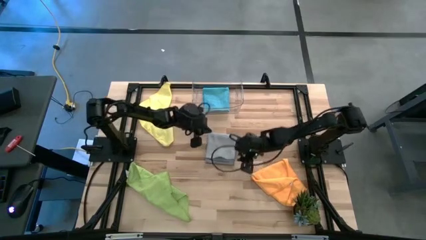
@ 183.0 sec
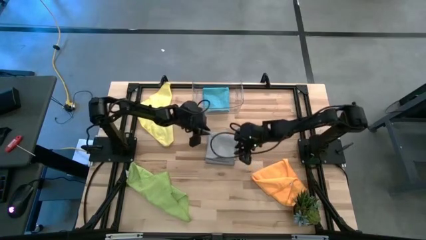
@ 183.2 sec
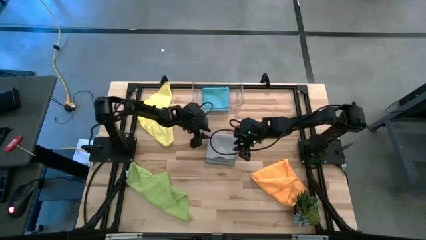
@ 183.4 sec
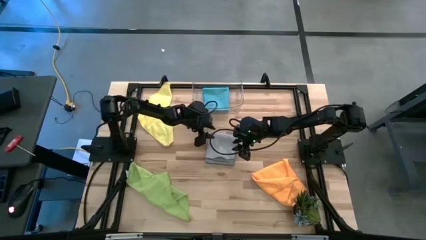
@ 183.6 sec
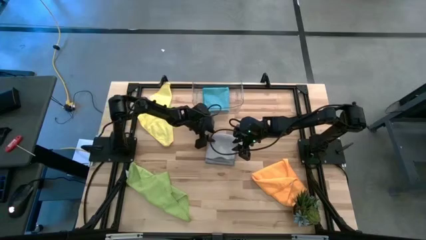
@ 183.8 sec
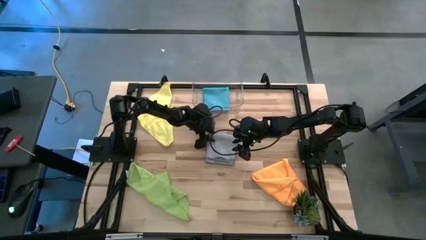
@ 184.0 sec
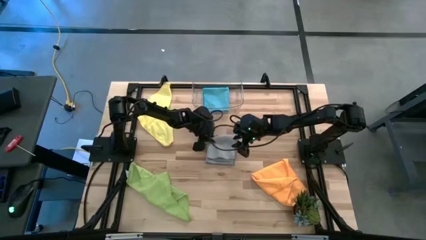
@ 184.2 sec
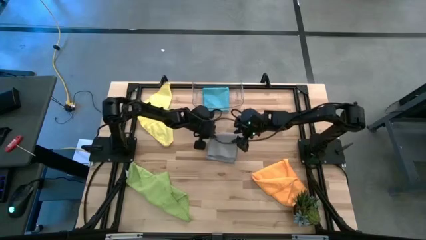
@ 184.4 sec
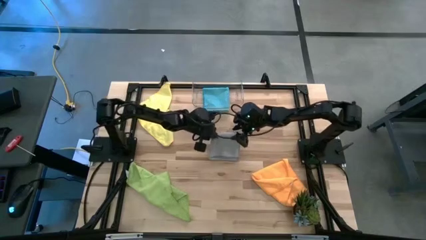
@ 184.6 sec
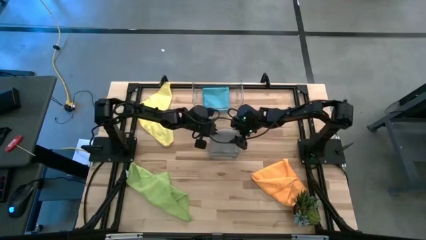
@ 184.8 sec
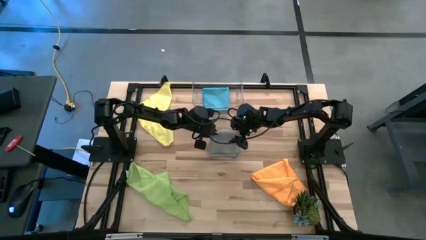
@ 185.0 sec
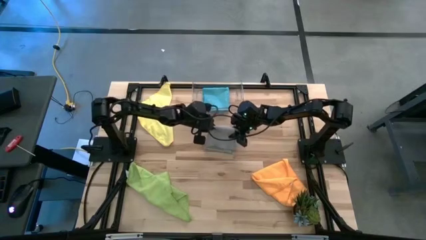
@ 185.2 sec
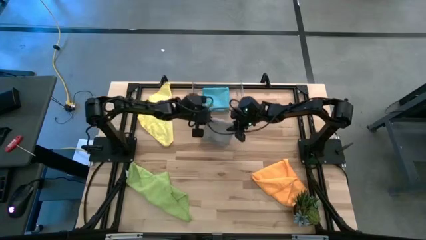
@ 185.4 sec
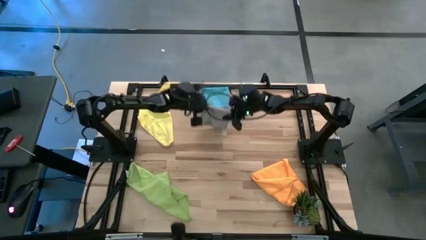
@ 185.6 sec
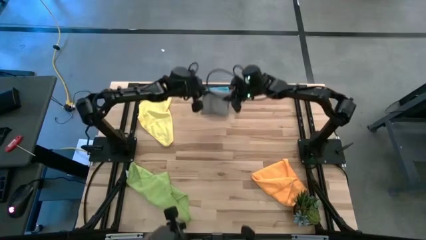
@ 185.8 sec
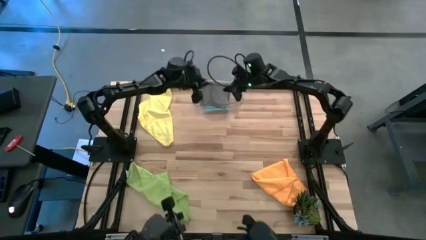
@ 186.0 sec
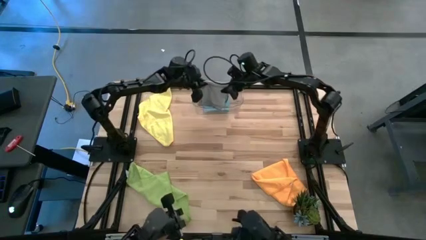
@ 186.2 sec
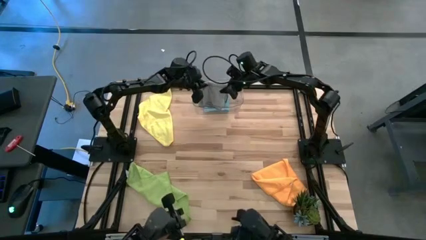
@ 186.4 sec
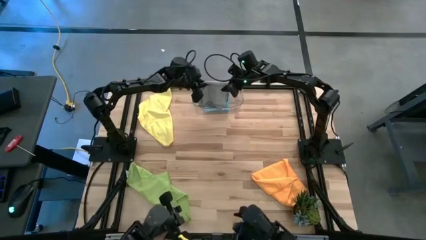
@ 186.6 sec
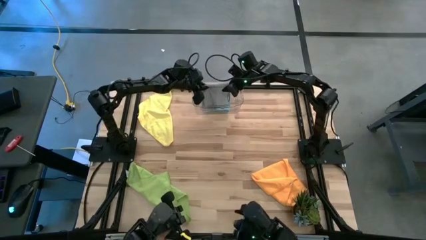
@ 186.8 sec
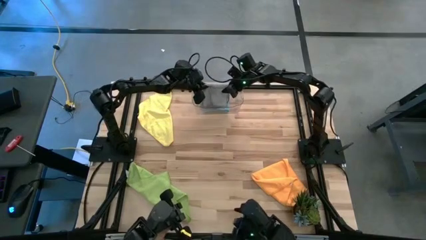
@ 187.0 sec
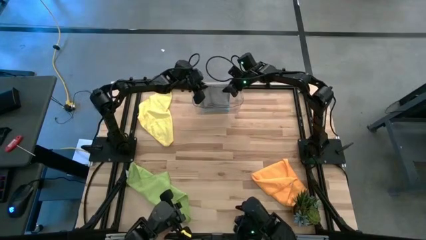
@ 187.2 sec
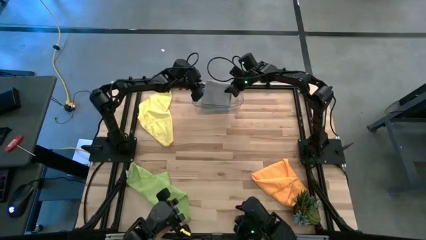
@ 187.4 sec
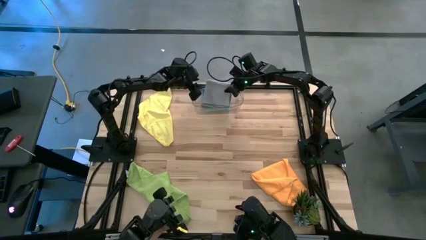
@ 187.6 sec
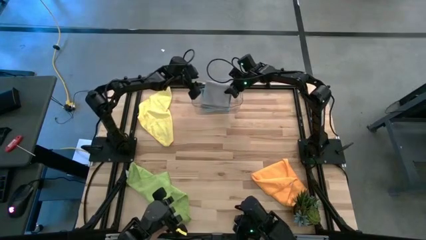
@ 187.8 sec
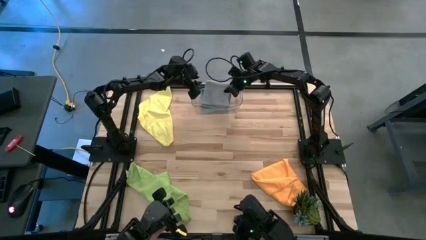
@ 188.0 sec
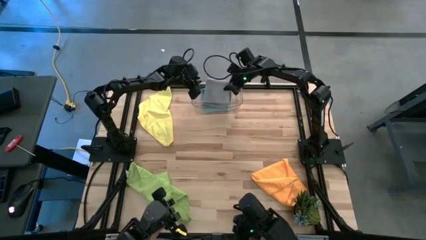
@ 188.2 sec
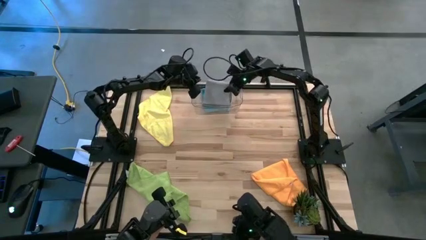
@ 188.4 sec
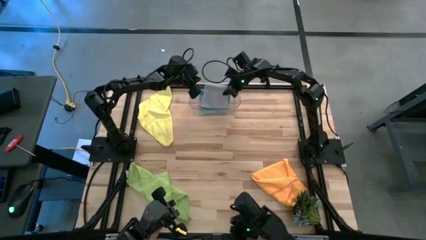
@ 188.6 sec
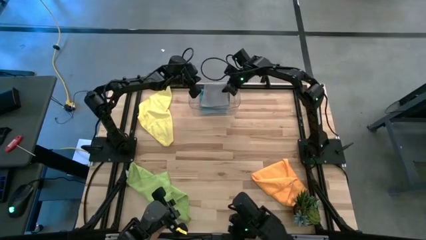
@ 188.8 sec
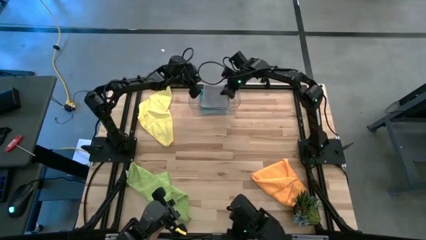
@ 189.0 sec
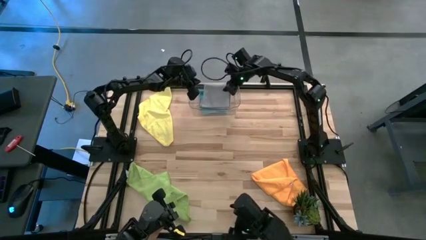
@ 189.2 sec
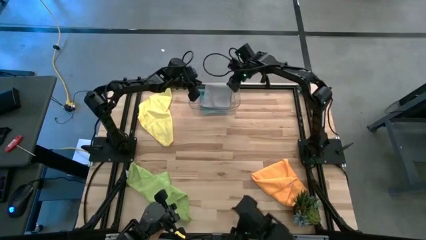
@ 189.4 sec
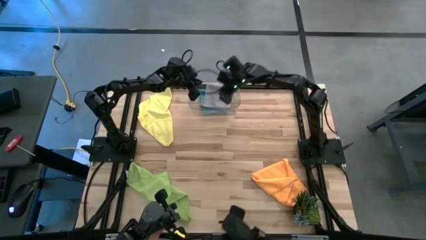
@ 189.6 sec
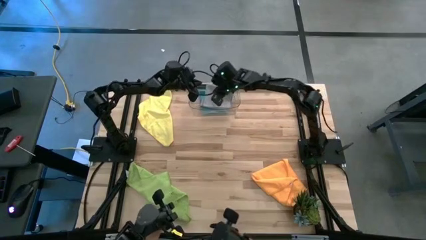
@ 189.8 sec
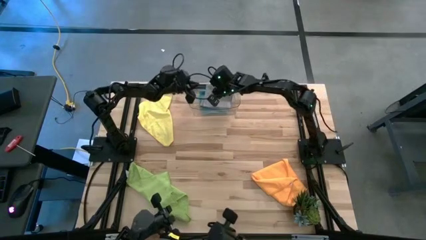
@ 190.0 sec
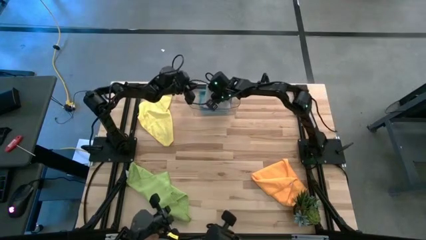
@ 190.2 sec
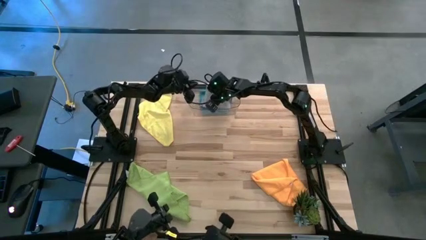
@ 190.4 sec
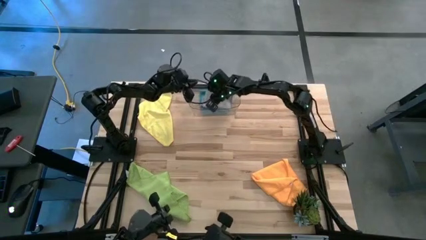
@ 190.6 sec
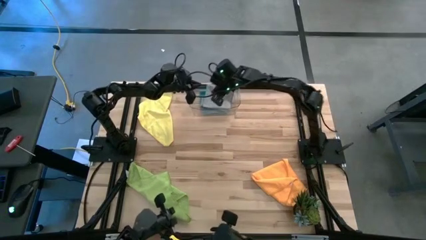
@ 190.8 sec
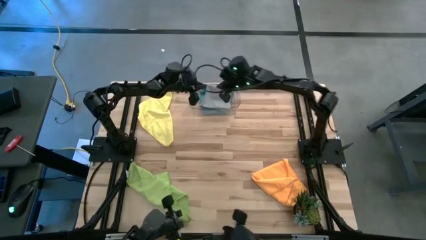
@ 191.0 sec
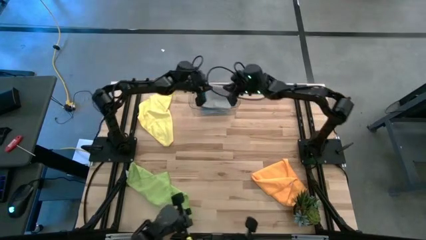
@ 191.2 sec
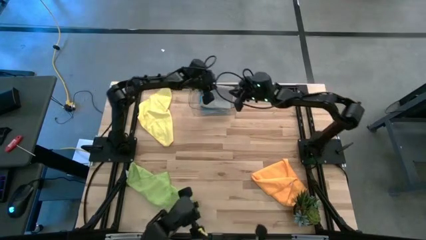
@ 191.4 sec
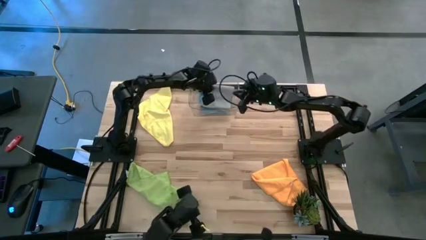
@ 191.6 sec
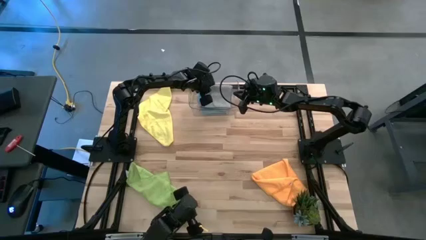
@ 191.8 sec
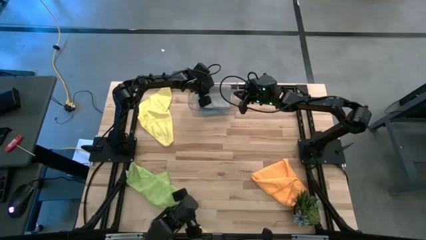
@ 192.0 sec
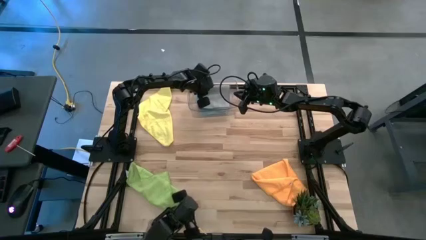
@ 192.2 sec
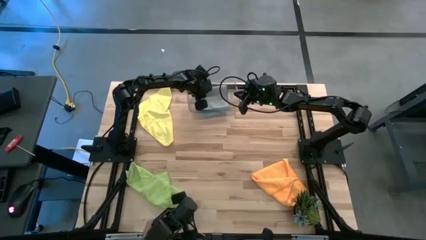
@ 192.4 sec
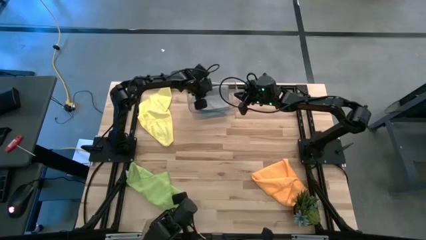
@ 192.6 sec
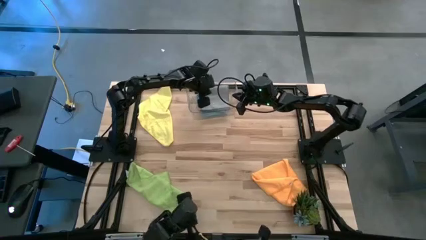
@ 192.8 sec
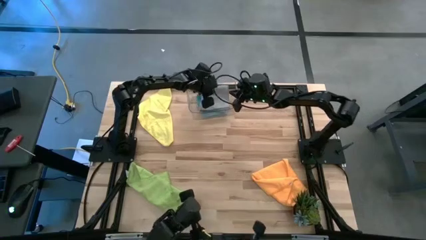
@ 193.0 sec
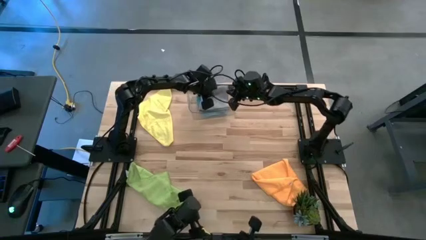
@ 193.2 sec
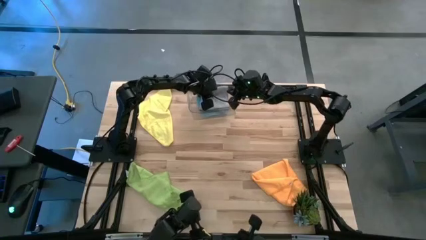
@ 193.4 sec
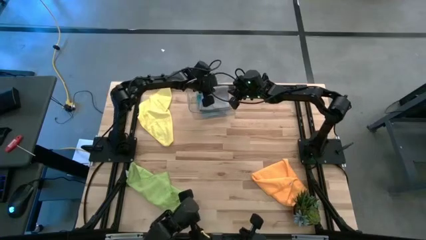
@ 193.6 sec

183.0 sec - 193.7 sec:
Task: Fold microfiber towels
Put the gray towel into the transparent bin

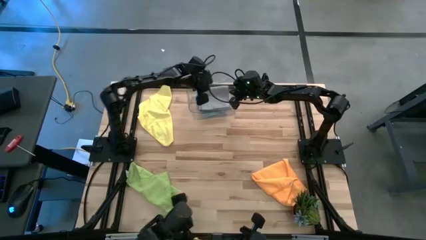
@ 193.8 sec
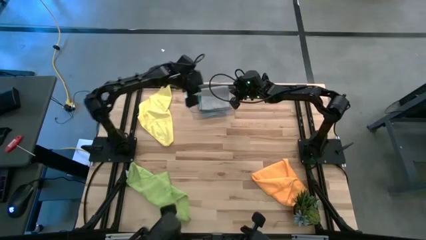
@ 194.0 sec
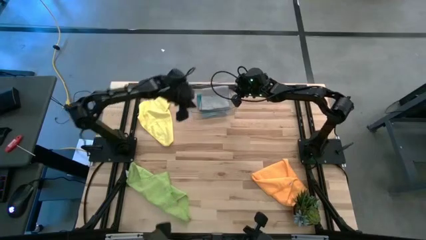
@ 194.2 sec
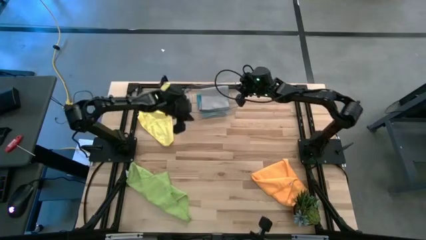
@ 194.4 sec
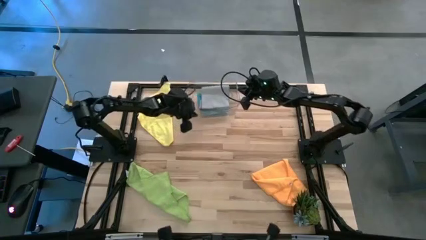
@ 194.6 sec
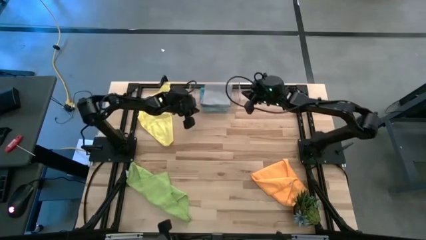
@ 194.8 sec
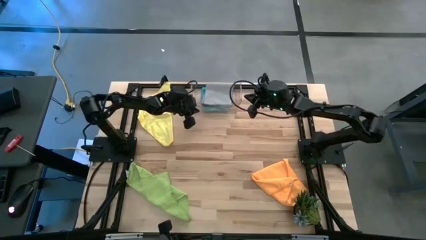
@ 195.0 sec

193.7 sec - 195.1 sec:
Adjust the transparent bin

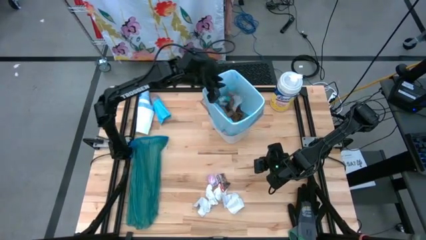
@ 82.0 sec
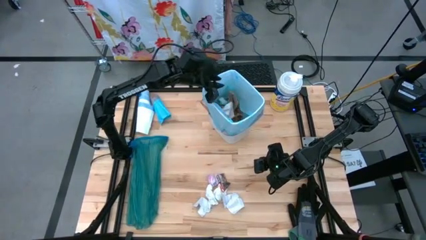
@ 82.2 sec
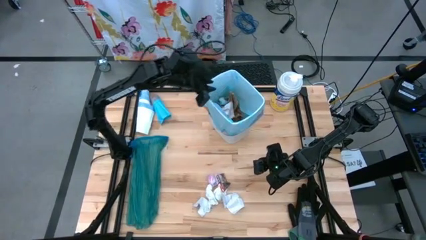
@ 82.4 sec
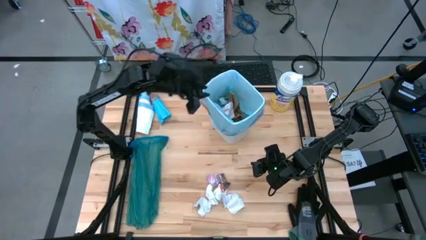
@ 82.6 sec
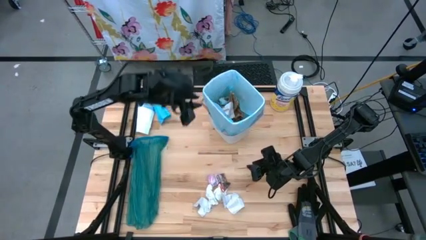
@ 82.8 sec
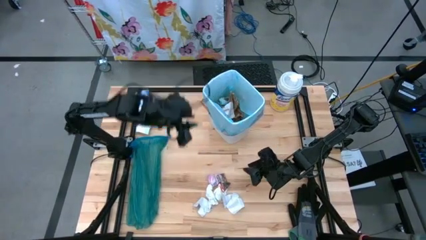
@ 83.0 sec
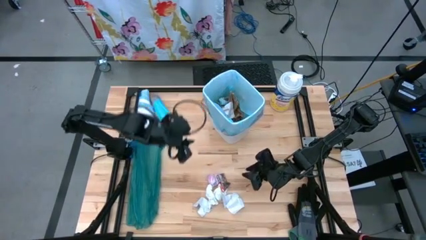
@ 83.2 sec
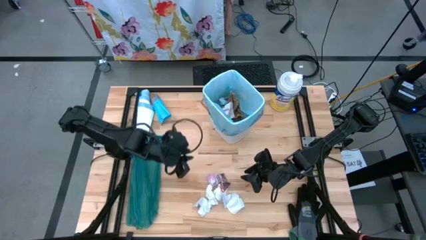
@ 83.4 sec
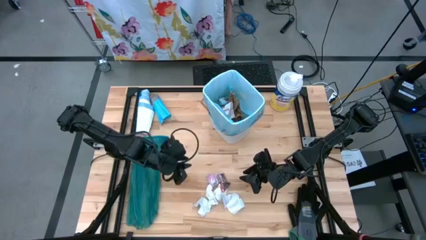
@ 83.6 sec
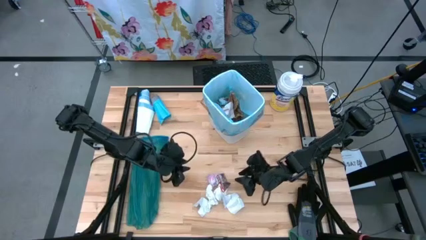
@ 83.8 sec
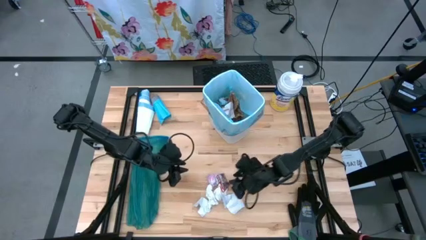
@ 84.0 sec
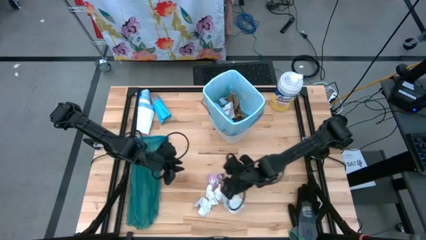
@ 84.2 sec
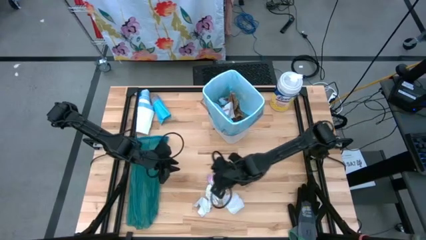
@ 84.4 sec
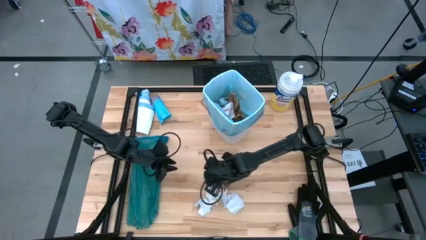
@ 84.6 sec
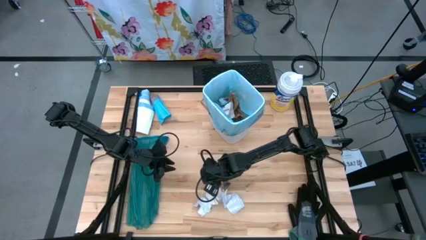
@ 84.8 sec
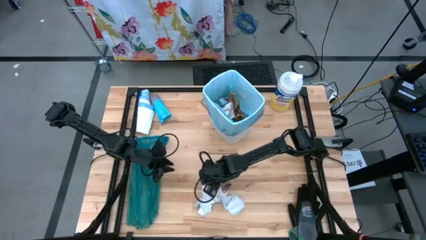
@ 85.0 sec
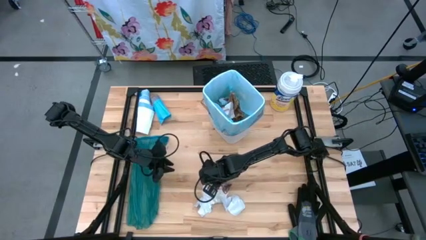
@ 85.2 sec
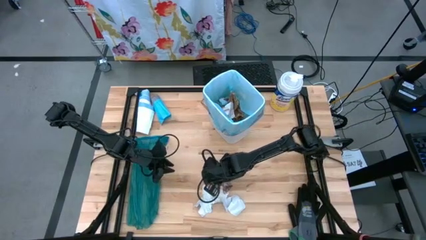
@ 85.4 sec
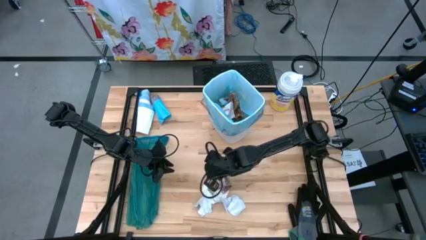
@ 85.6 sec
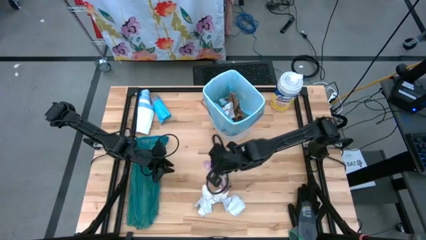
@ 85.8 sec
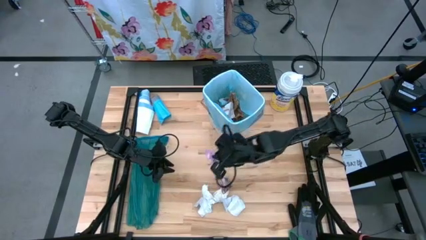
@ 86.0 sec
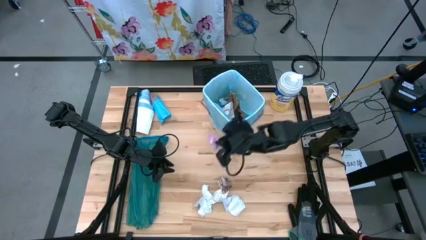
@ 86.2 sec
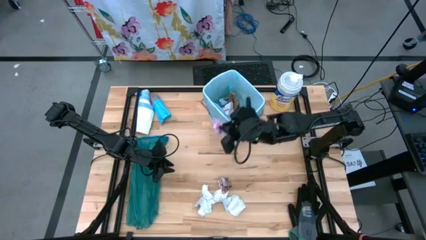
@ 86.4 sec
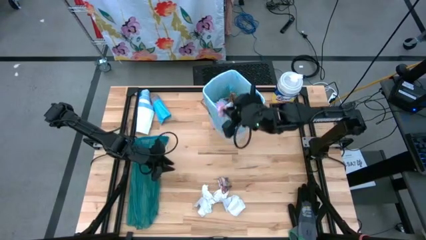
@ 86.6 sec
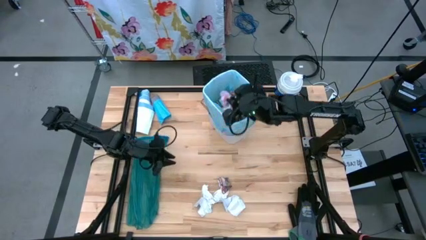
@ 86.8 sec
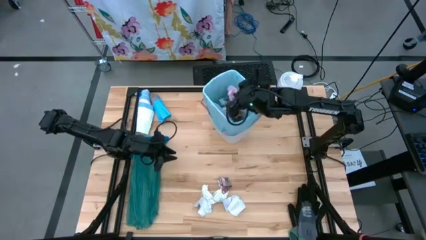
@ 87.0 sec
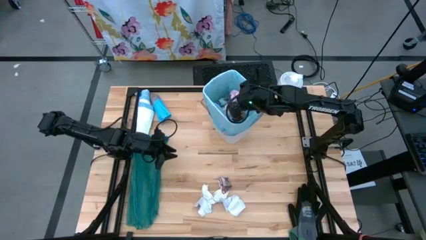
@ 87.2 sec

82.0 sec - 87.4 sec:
Task: place trash/remove bag and relplace
Put the pink plastic into the trash bin
